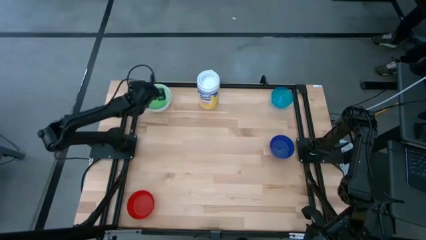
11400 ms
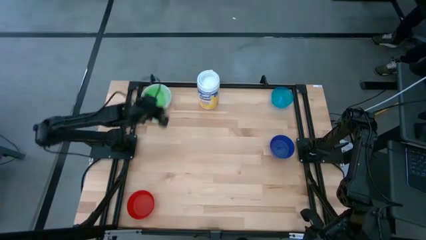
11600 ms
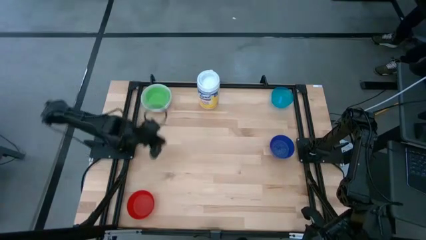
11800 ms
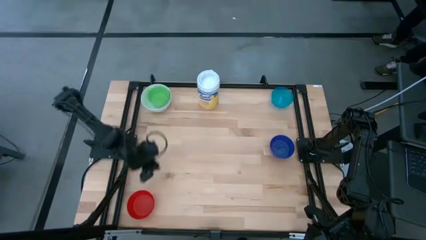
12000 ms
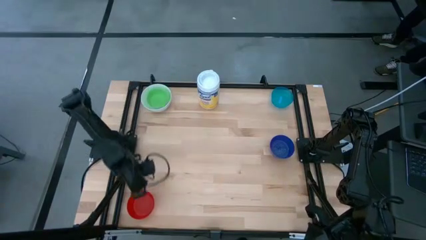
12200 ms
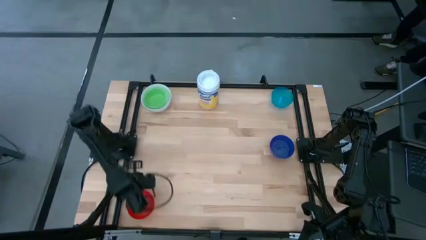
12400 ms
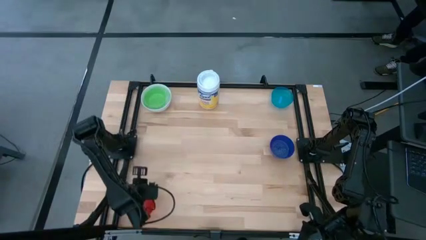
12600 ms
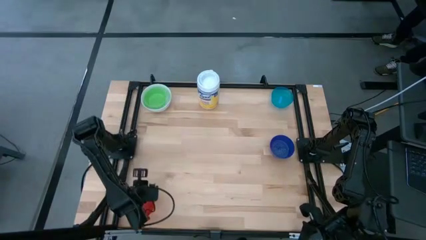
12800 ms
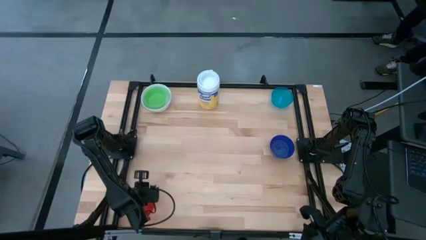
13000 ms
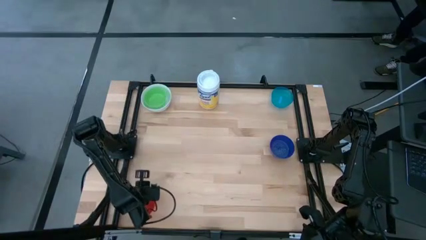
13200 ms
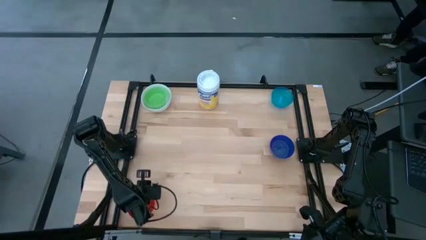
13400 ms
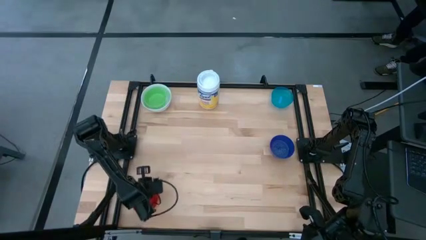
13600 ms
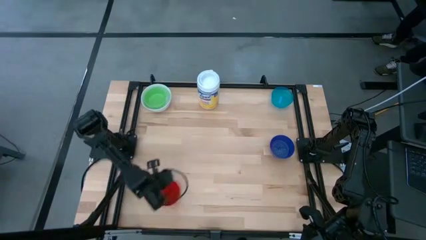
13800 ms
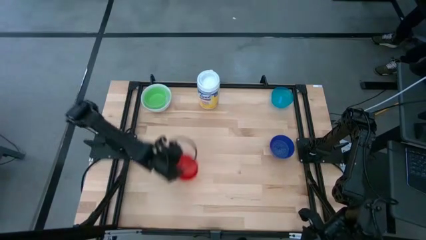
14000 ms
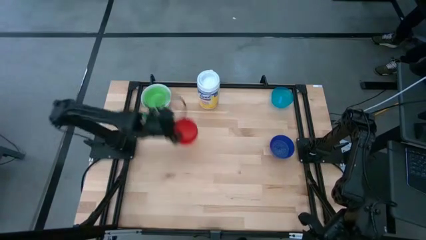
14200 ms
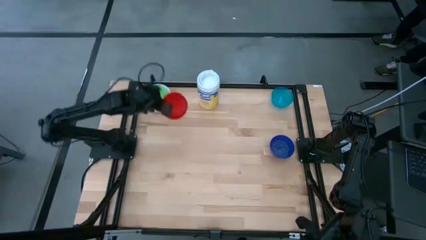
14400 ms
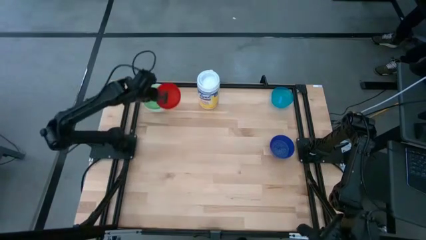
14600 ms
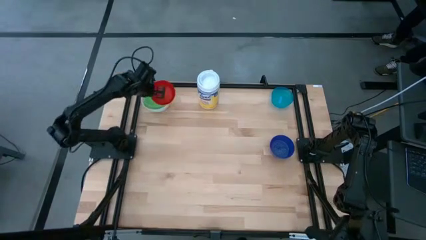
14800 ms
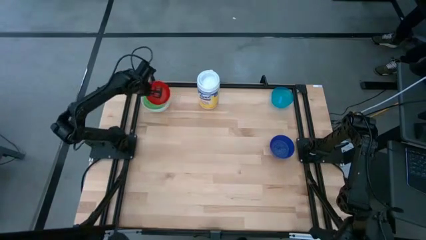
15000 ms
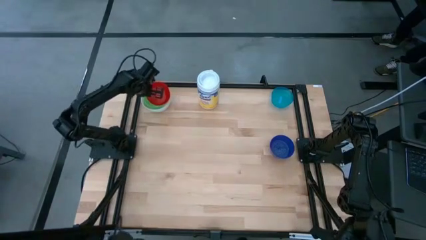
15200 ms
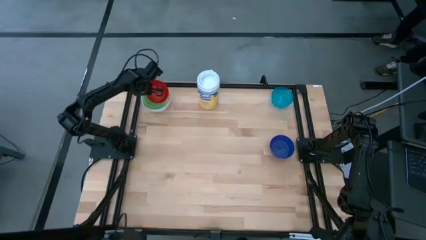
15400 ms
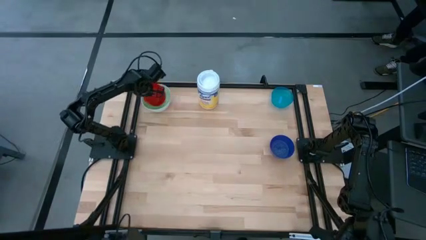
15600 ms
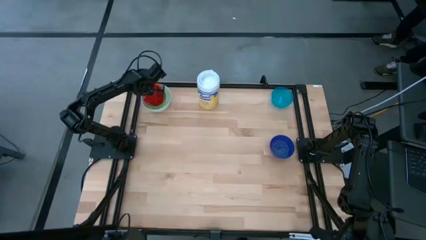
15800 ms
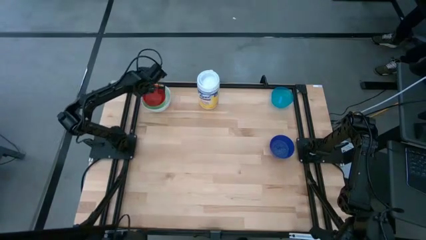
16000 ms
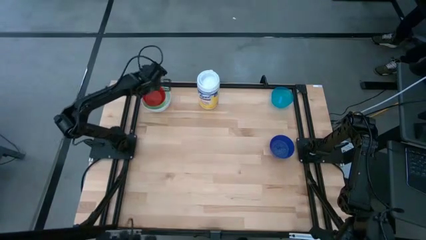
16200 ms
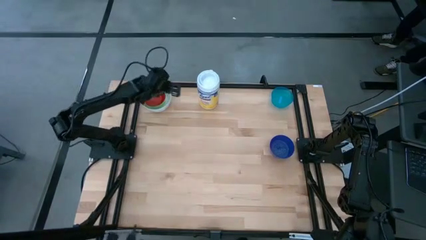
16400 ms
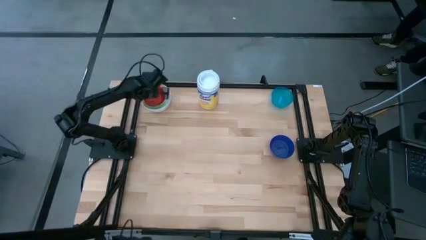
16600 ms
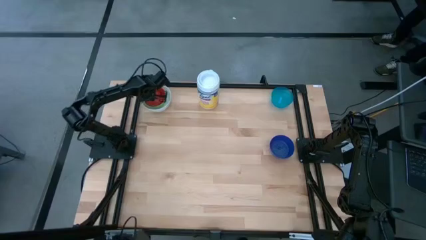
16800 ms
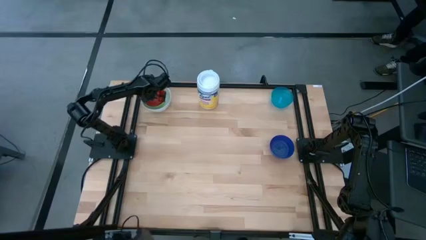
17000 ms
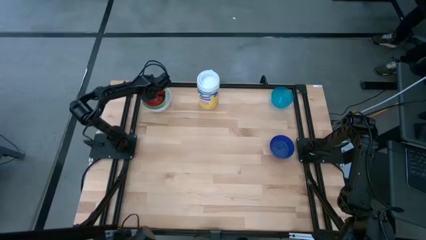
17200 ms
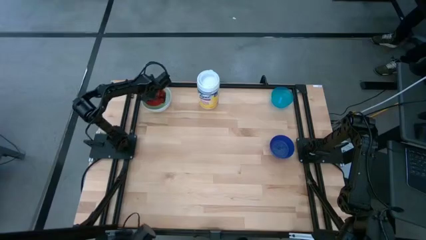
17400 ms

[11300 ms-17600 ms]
Stack the red bowl on the green bowl

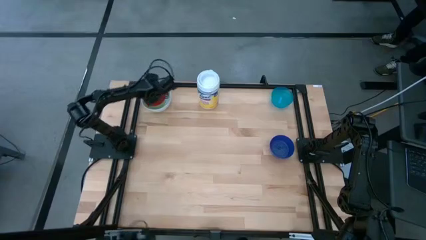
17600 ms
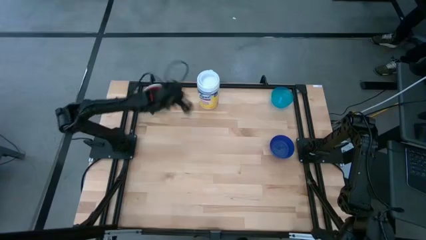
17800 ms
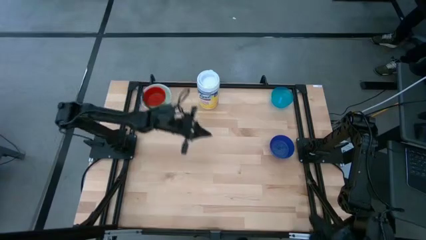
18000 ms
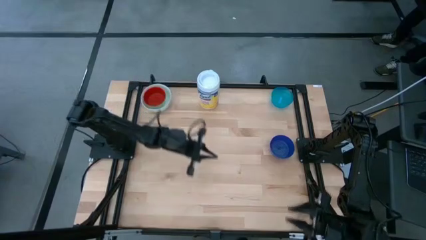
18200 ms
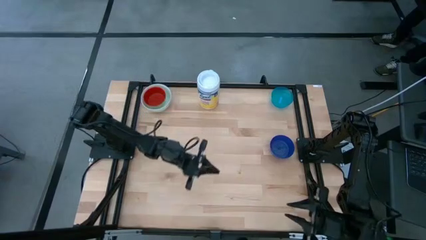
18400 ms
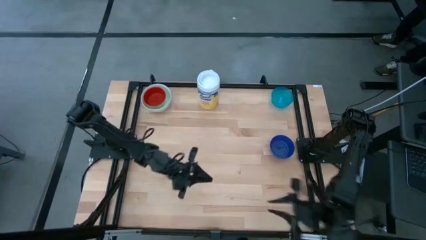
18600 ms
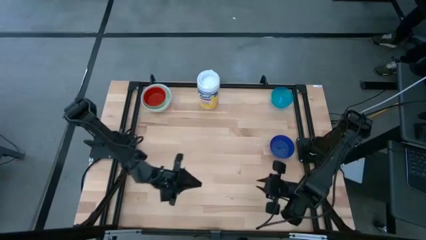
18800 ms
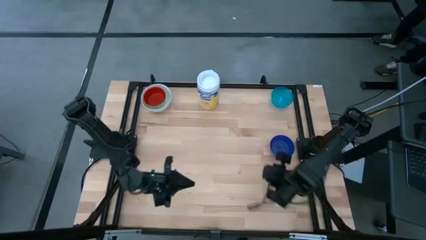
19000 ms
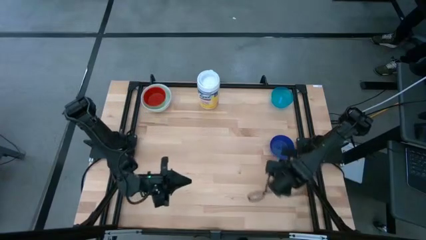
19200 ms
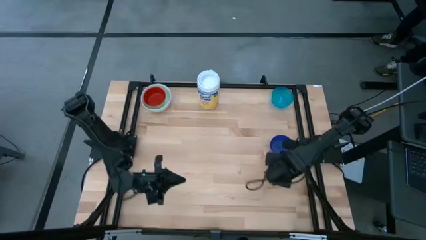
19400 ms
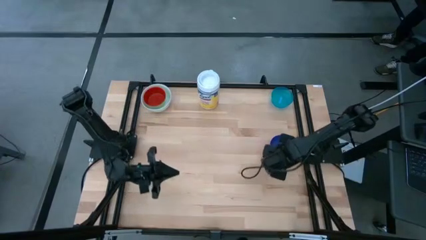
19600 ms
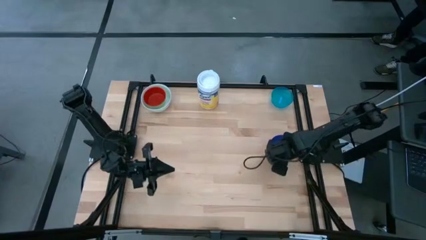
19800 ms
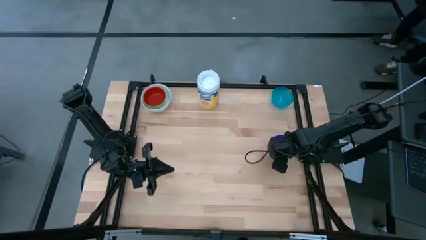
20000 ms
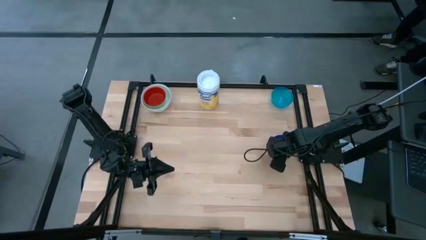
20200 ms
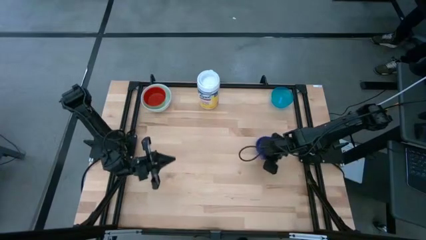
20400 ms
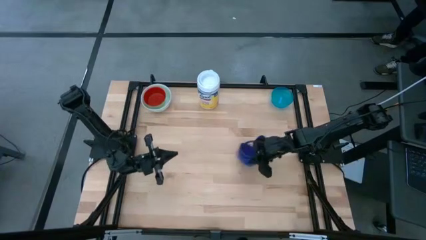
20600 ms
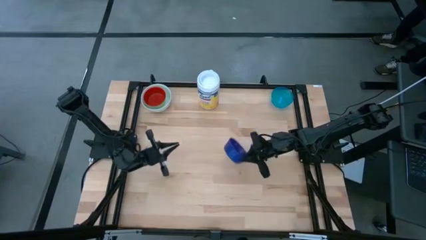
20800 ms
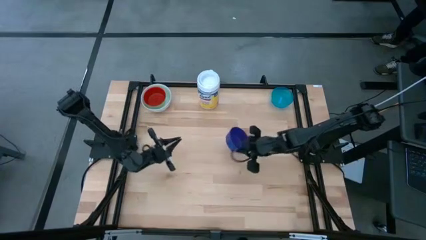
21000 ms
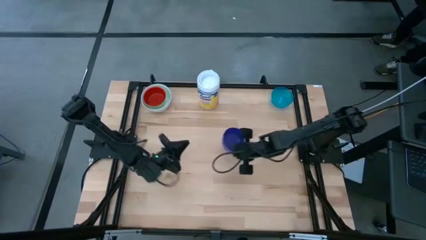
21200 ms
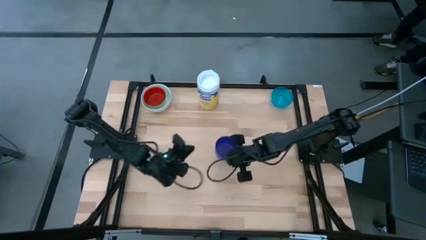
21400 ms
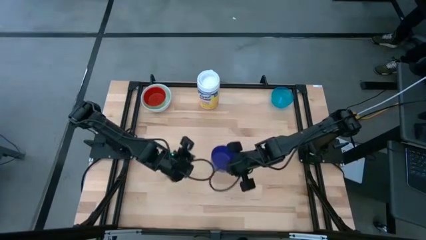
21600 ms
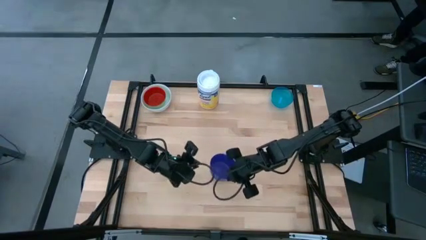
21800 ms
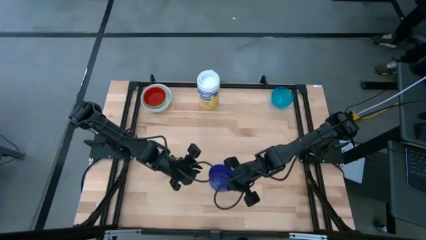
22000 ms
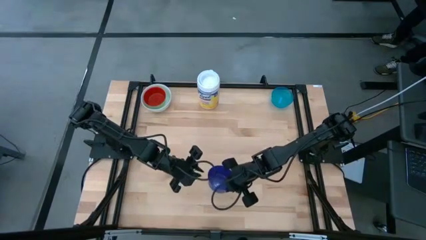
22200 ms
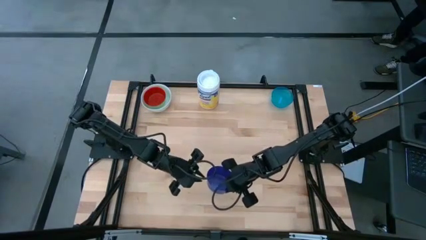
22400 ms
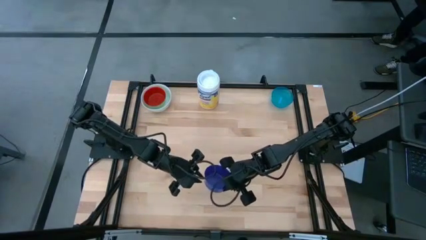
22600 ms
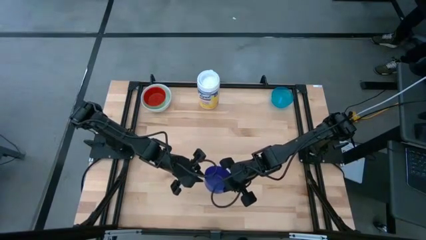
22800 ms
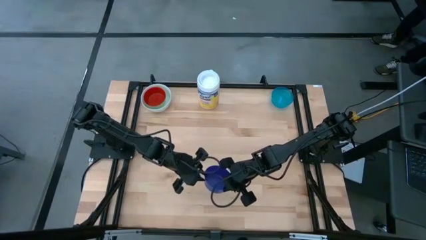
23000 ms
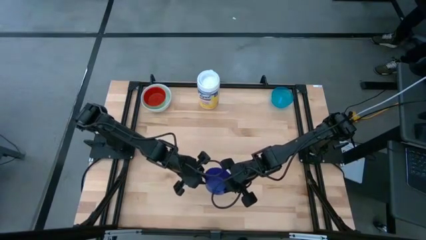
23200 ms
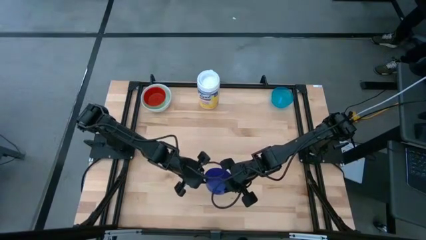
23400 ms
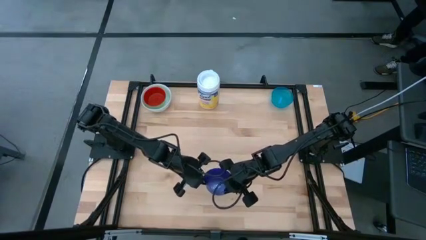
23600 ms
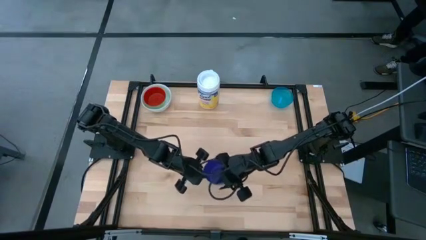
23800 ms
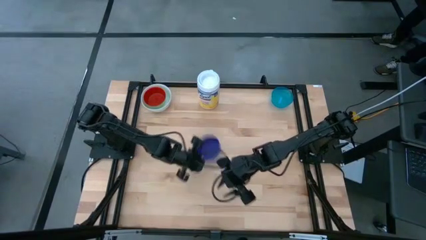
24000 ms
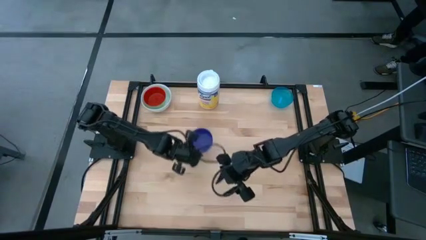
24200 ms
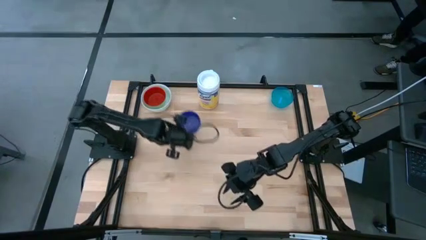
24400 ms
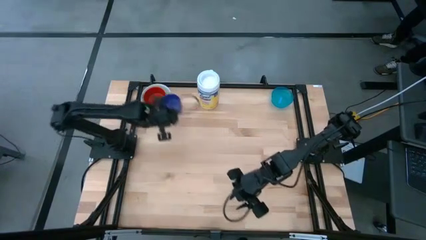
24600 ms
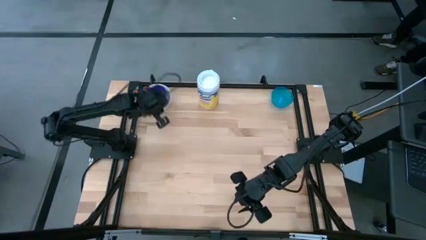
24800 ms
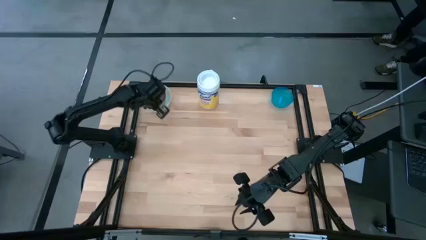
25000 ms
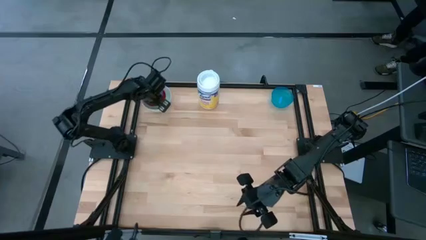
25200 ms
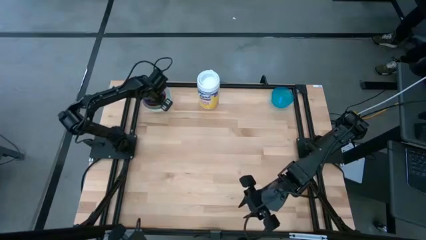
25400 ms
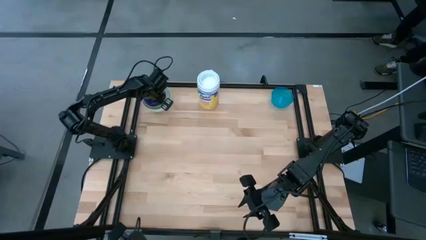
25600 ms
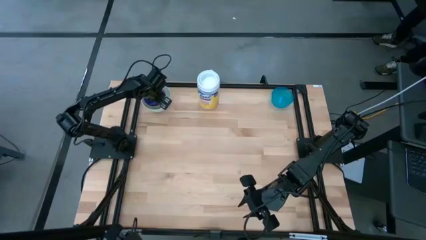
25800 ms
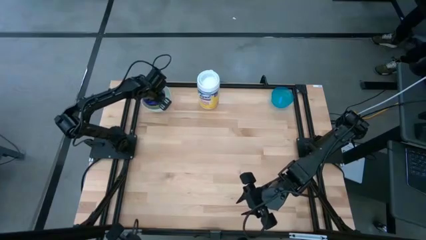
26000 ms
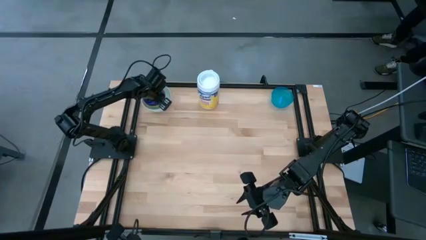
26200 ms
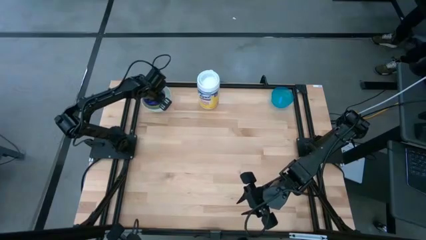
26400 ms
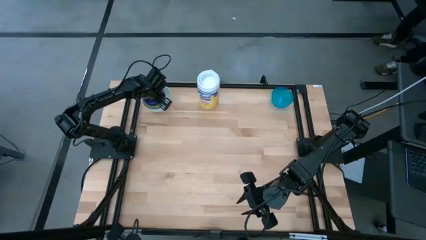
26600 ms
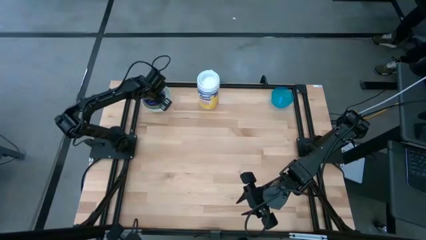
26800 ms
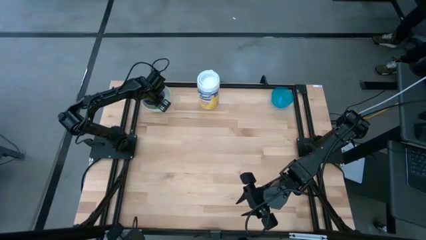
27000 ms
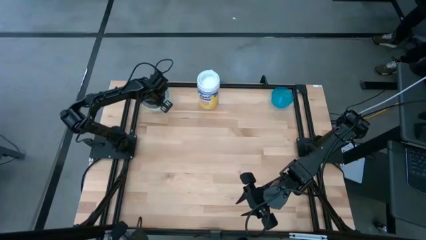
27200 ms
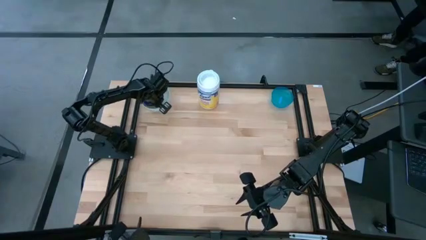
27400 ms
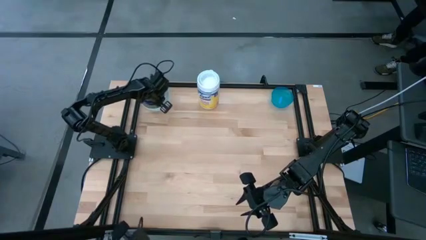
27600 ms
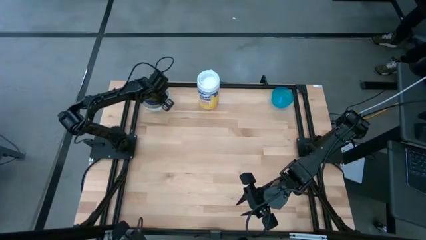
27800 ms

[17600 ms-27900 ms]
Stack the deep blue bowl on the red bowl
